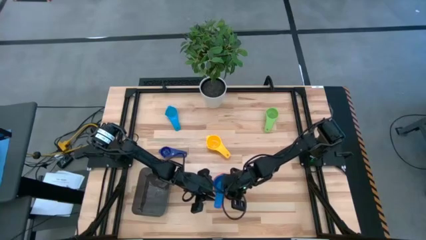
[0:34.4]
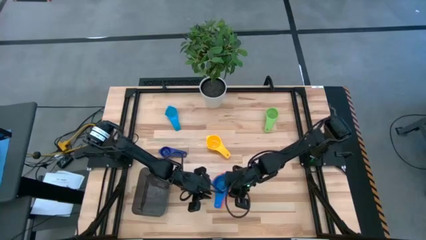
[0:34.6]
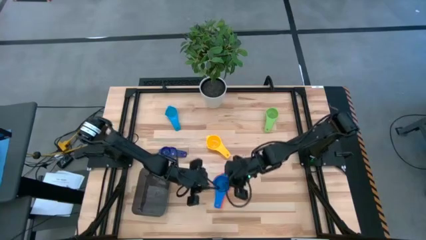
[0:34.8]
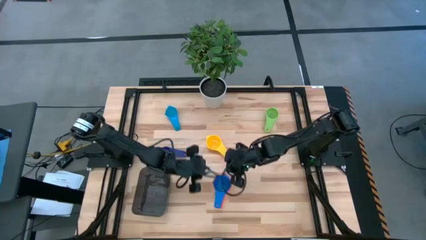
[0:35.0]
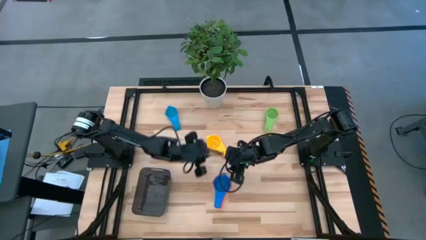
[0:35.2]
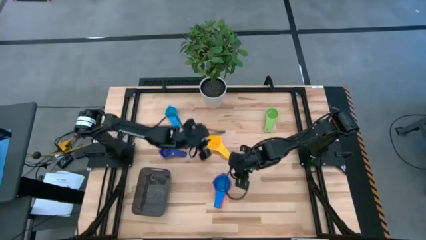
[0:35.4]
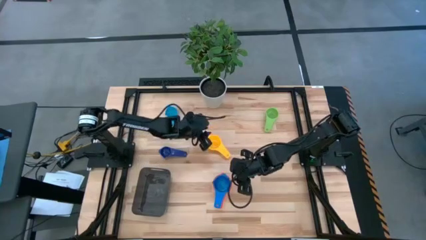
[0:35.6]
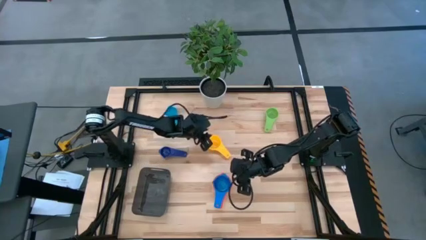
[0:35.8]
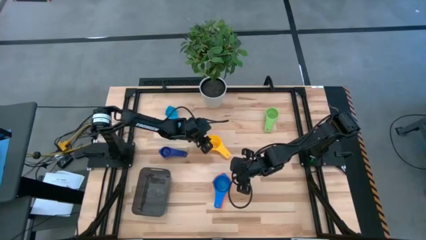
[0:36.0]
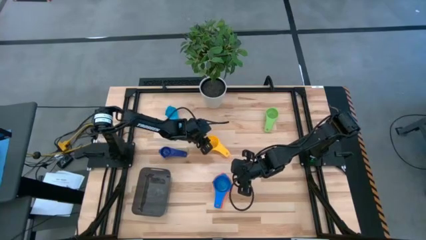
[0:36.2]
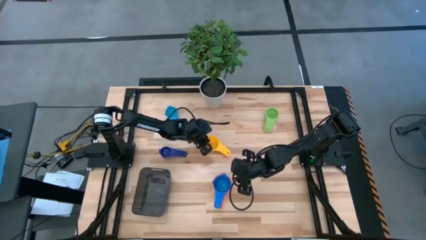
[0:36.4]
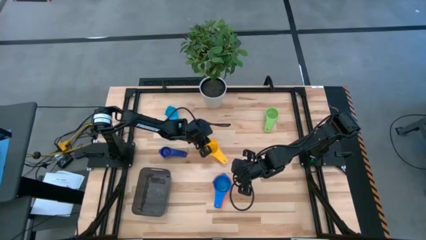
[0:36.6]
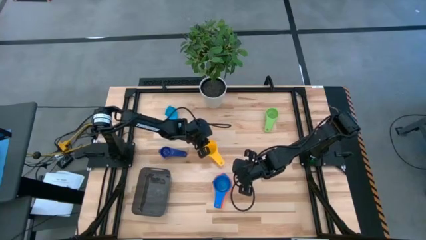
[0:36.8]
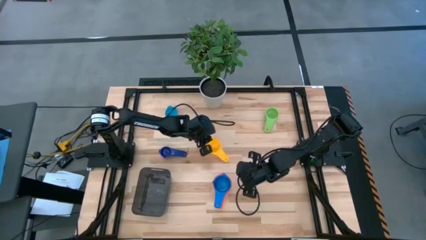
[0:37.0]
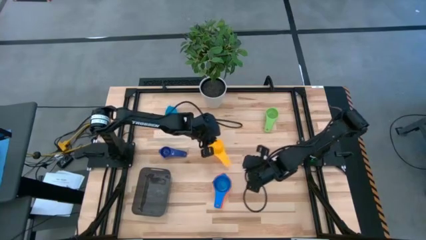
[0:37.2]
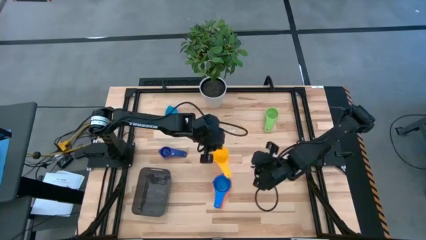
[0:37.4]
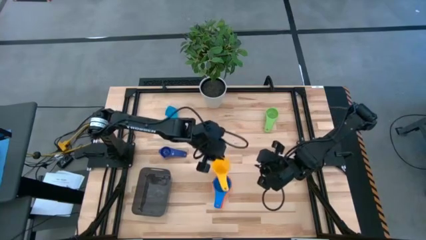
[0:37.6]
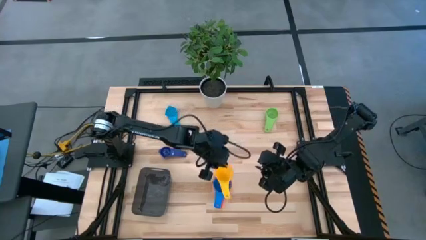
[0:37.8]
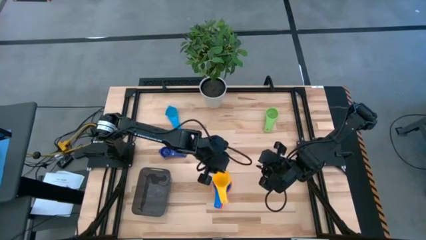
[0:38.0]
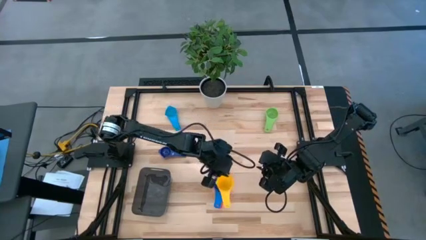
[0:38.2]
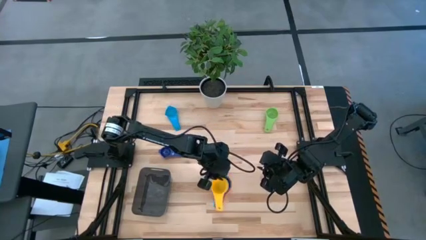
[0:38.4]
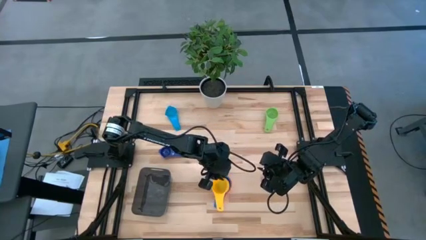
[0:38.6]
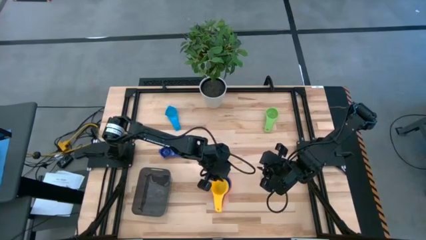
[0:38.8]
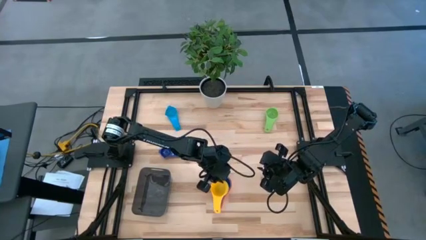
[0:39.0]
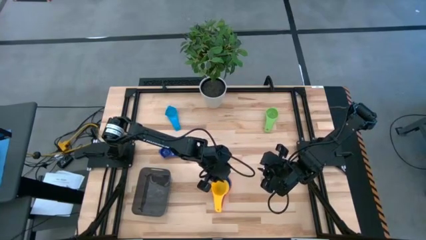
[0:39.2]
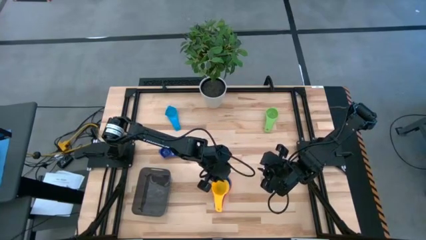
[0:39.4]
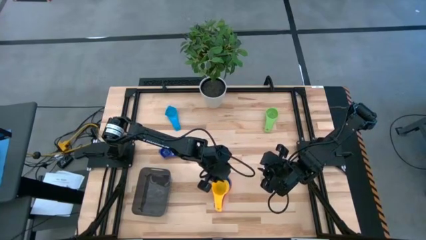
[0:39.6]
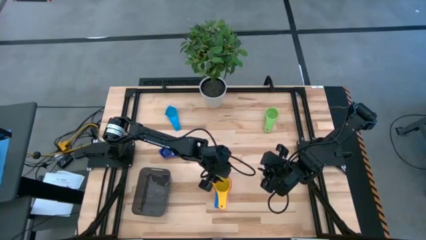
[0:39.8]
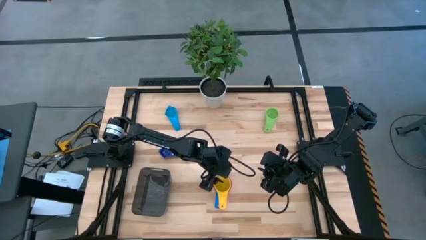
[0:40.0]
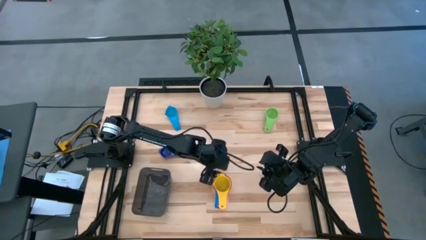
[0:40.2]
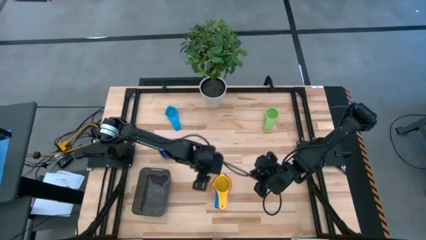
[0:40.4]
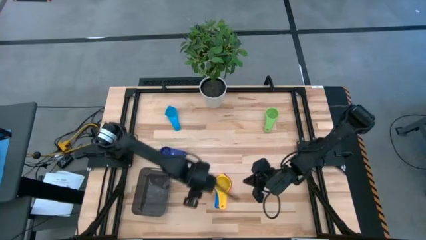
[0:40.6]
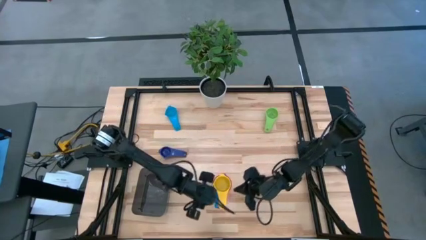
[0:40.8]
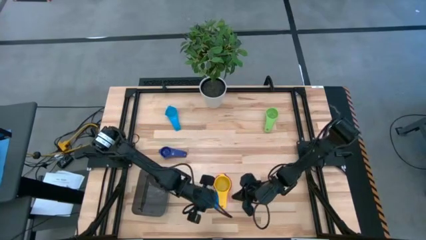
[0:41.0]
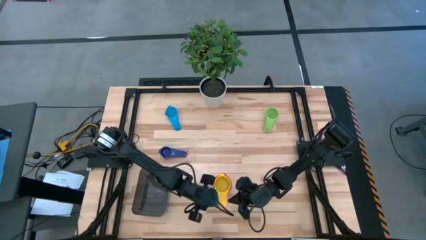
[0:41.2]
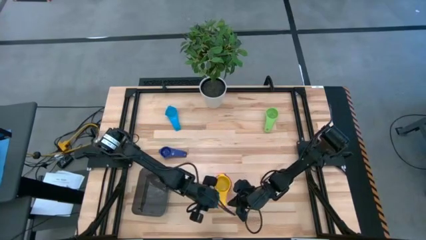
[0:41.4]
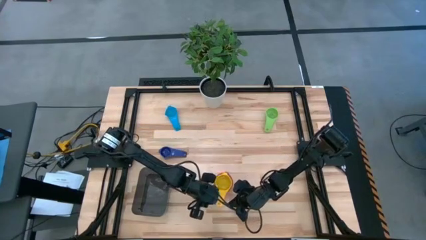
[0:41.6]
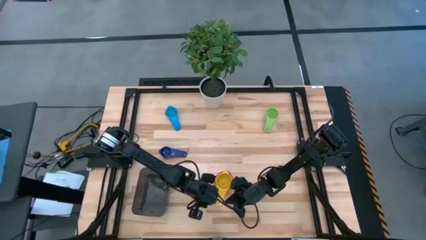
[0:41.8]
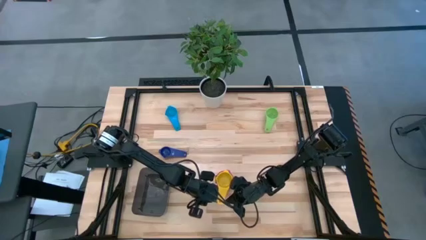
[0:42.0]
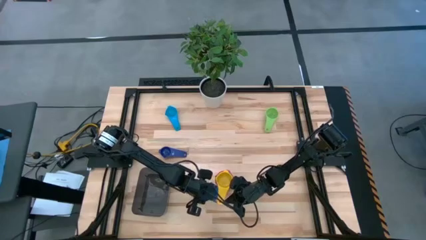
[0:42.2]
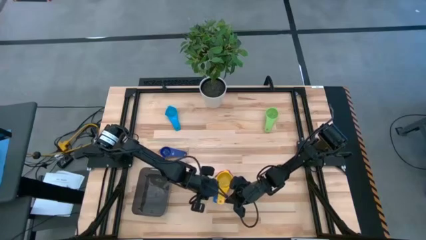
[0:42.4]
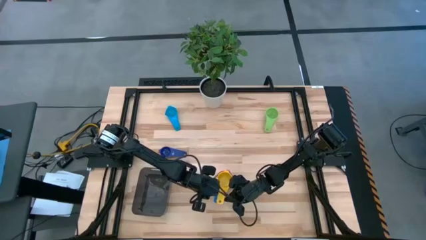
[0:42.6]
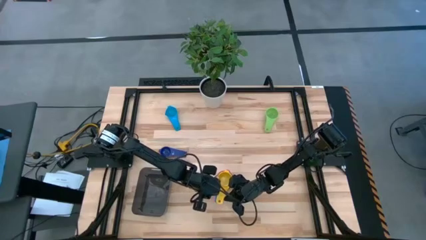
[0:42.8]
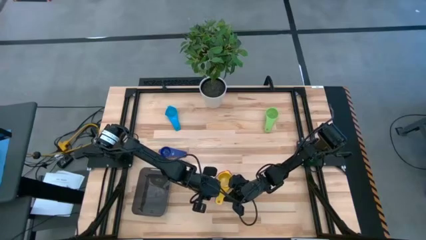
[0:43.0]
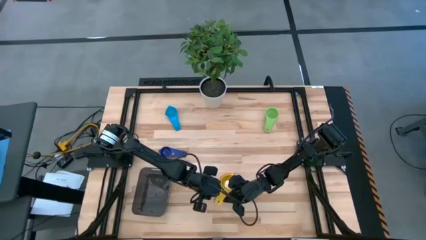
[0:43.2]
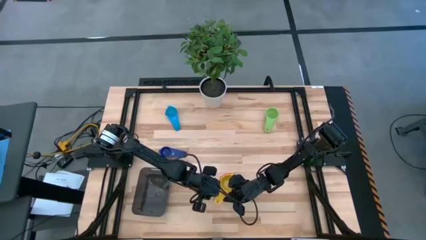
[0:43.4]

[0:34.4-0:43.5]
Task: Nest measuring cups in basket
Stack the yellow measuring cup on top of the blue measuring cup

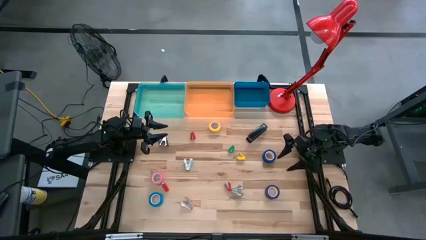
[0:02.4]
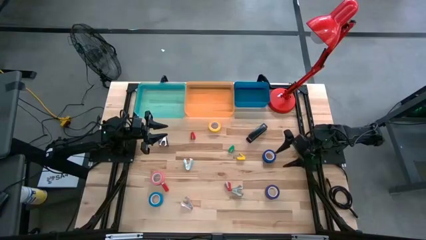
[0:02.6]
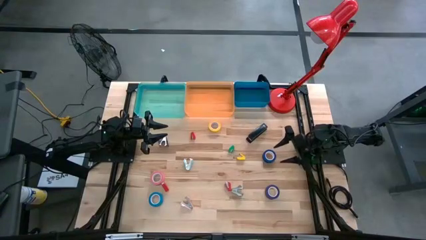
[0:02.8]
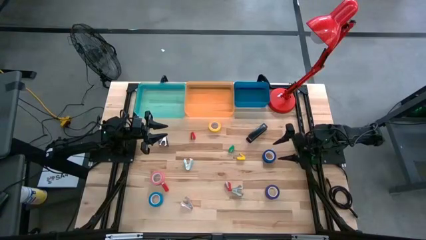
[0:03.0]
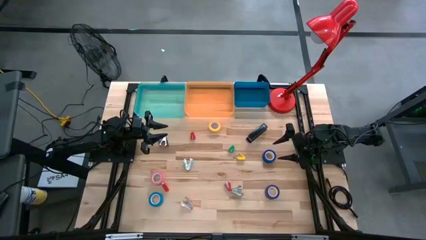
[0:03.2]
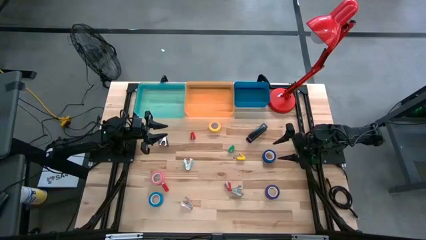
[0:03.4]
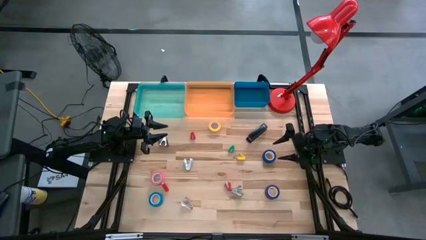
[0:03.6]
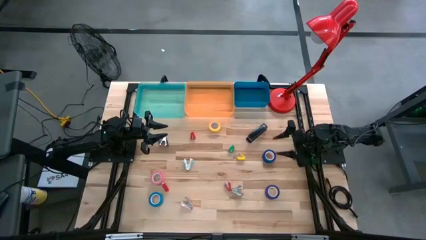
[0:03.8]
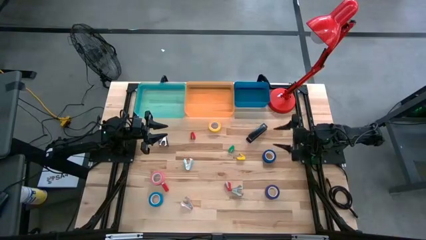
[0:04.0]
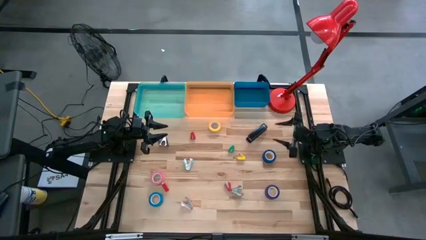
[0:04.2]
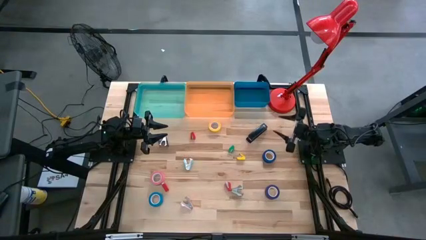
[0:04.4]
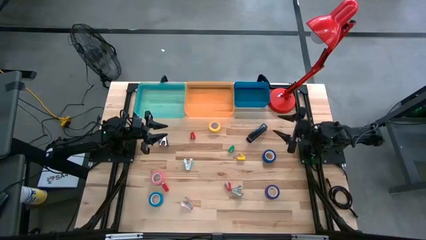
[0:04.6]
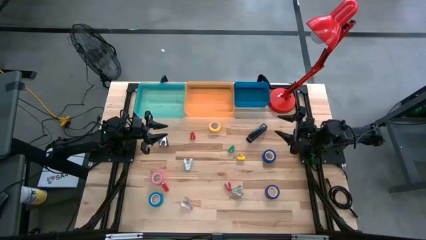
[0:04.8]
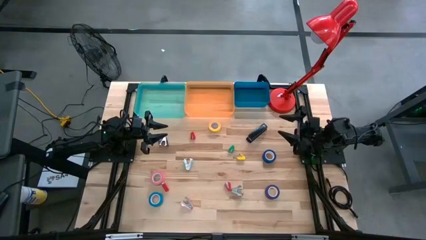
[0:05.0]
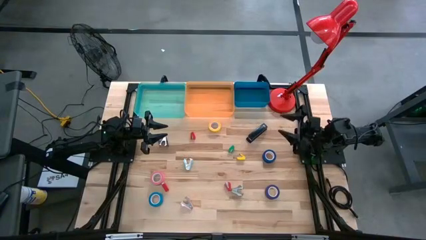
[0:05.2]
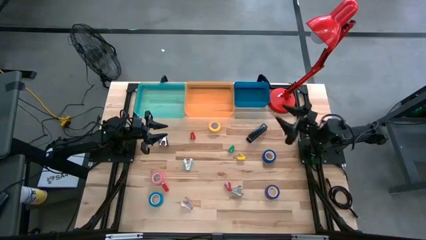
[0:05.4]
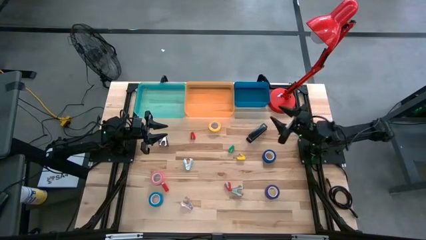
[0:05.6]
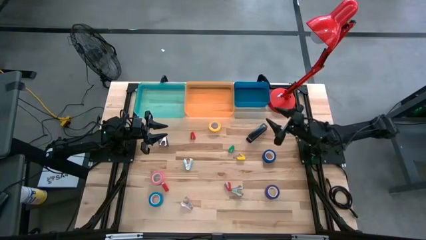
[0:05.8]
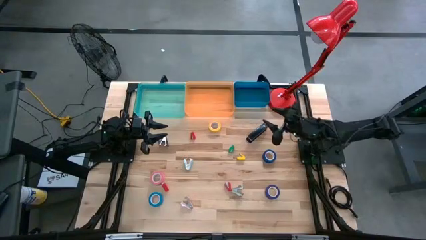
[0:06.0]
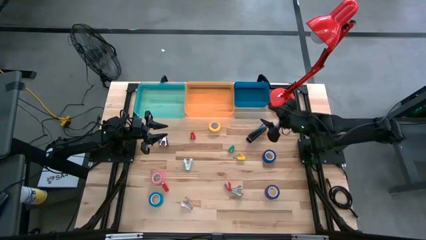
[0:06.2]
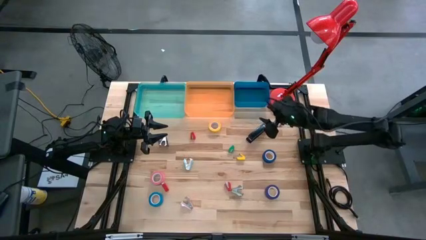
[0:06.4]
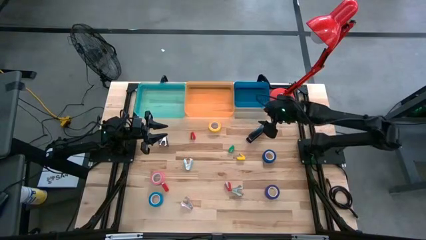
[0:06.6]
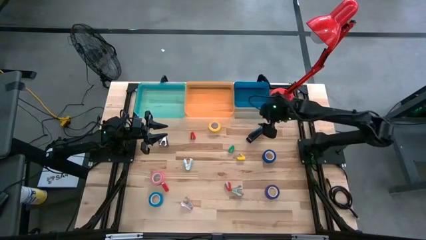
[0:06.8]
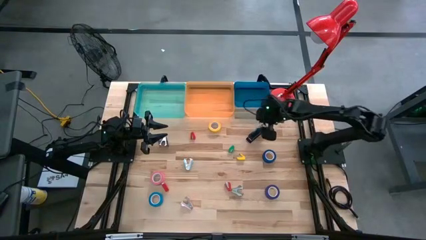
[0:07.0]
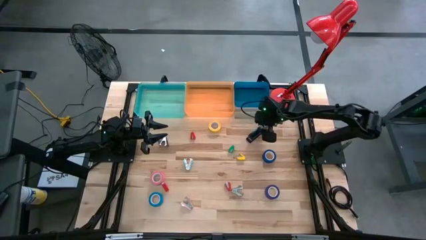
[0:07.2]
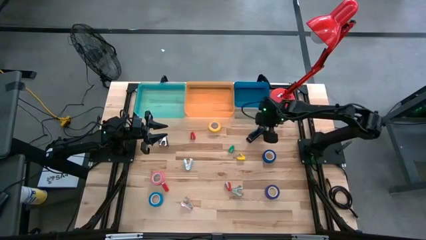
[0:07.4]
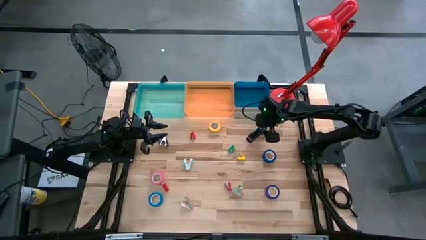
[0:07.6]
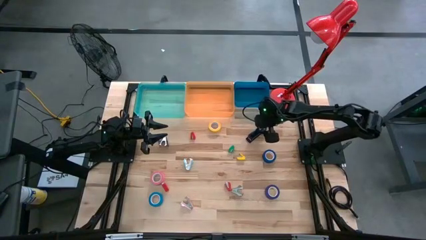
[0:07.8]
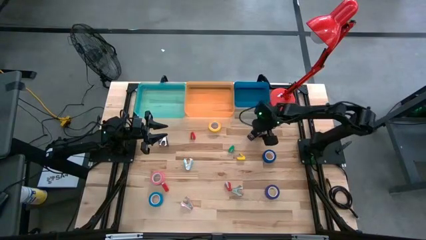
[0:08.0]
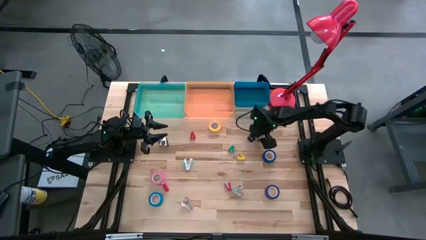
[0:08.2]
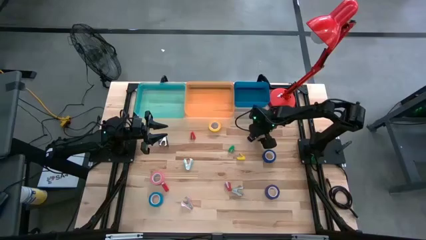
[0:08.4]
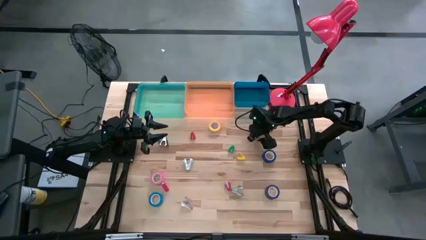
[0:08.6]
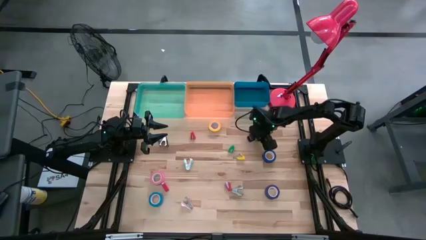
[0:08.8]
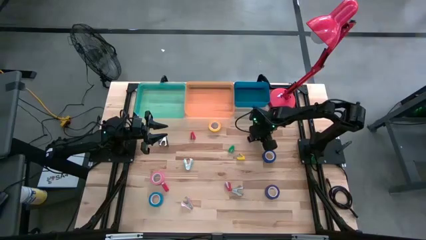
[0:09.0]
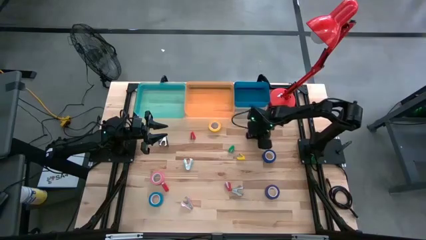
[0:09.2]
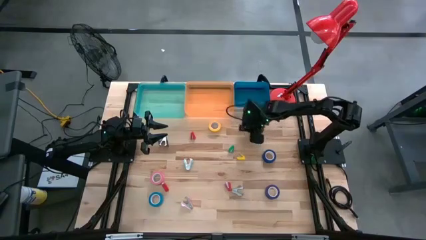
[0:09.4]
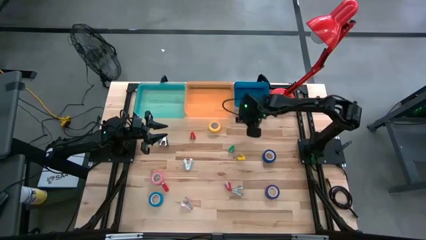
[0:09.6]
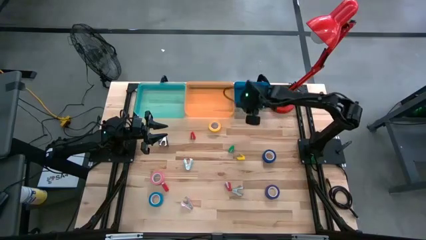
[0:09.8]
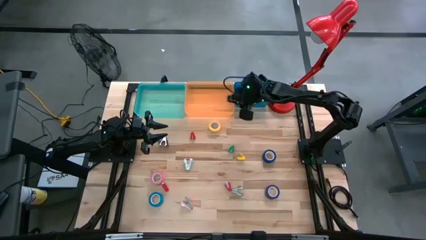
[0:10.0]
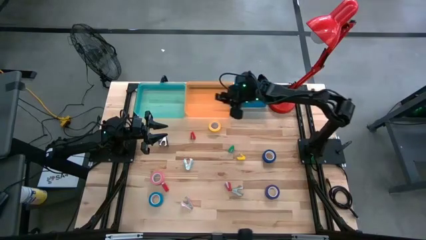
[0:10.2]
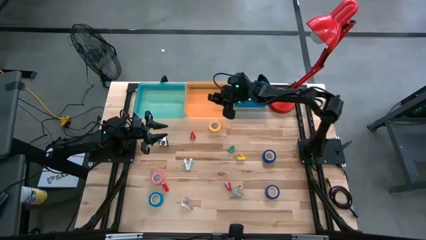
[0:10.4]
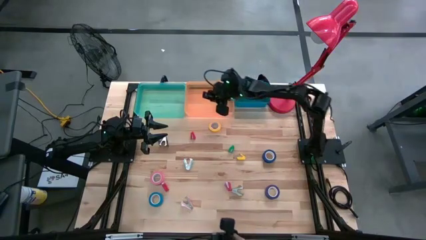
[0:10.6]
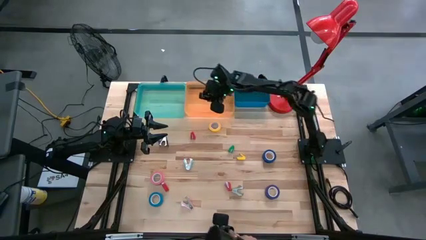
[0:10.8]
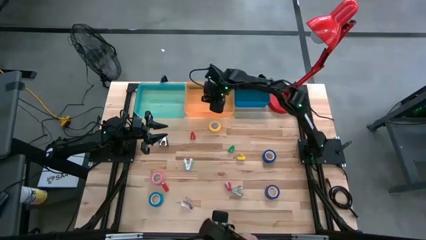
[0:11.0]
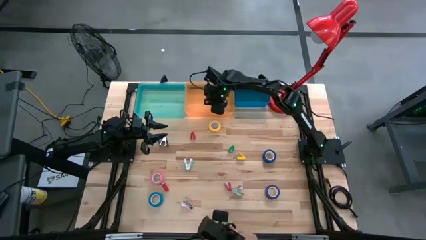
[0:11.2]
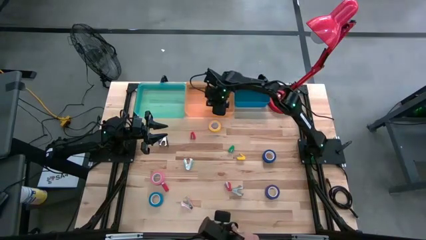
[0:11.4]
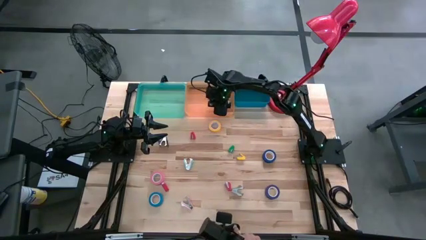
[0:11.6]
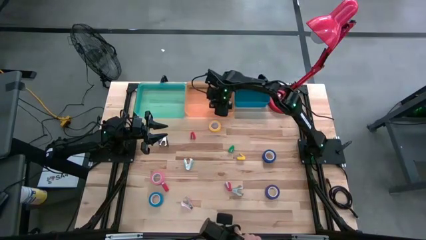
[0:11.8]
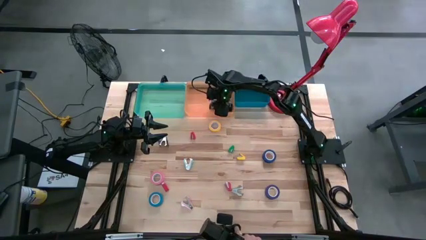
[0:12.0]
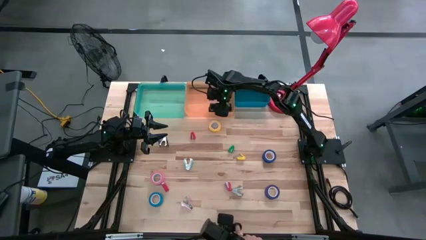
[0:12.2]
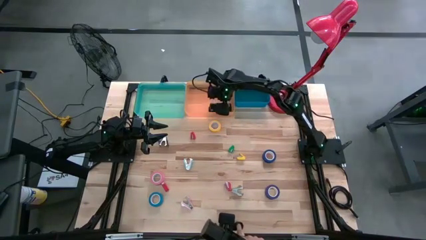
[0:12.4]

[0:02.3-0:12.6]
Task: Pick and place Stapler, Stapler remover, tape
Put the black stapler into the orange bin
